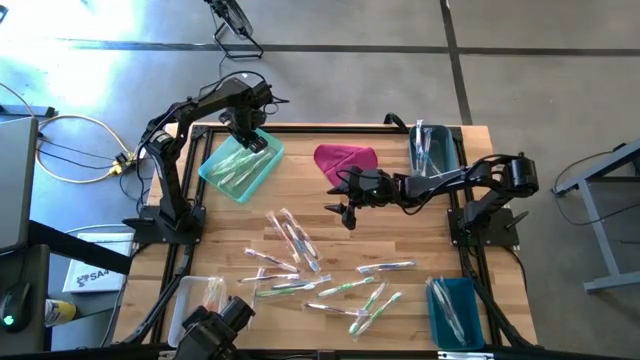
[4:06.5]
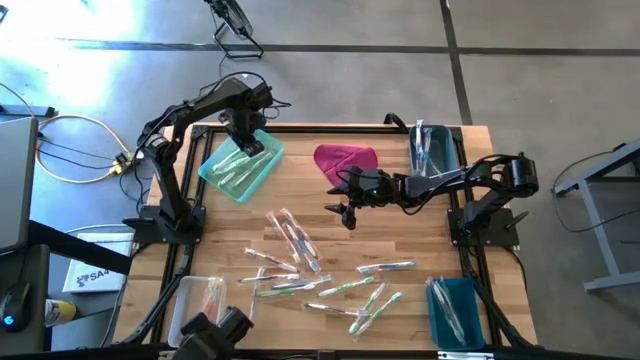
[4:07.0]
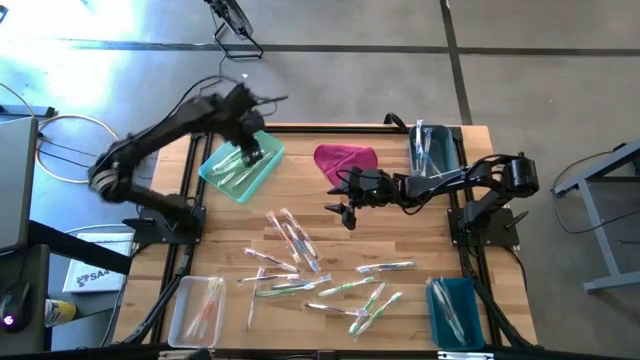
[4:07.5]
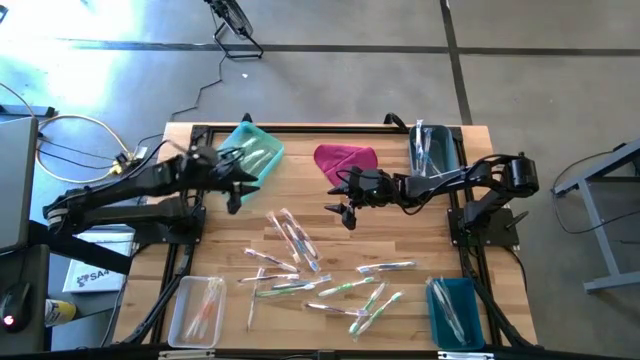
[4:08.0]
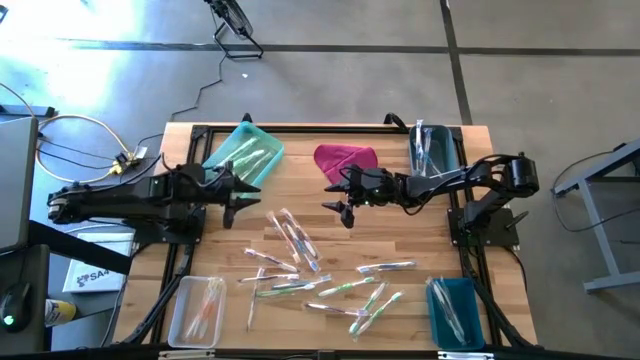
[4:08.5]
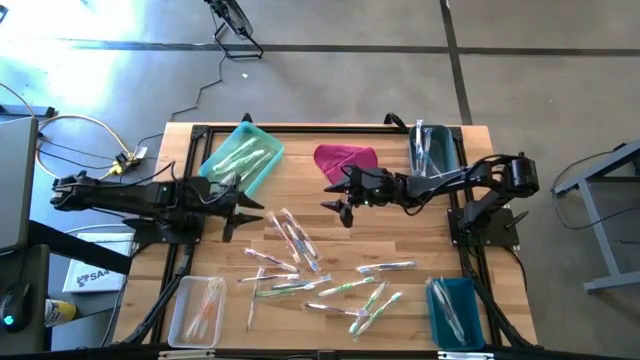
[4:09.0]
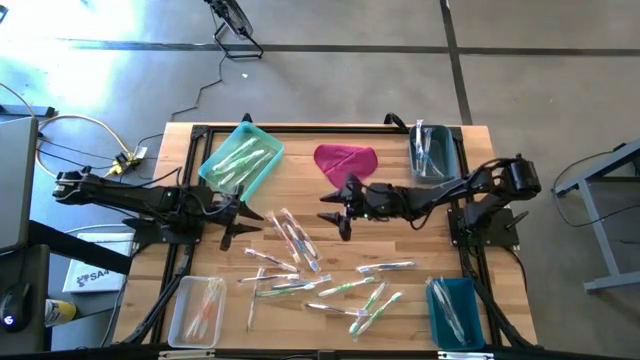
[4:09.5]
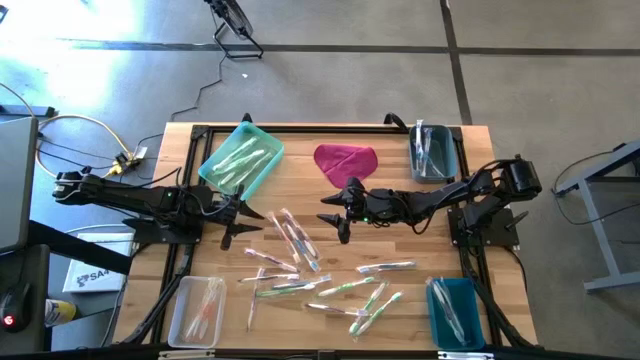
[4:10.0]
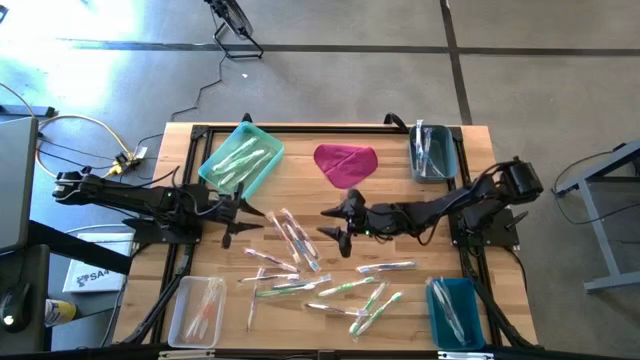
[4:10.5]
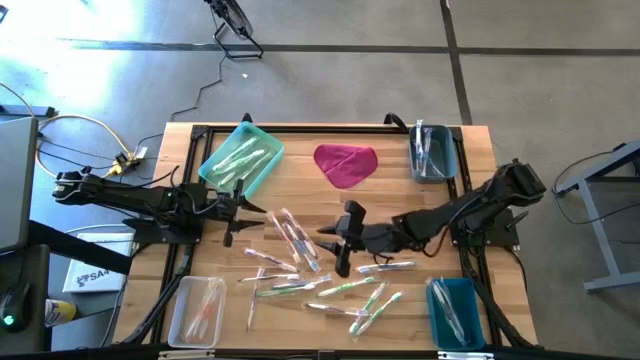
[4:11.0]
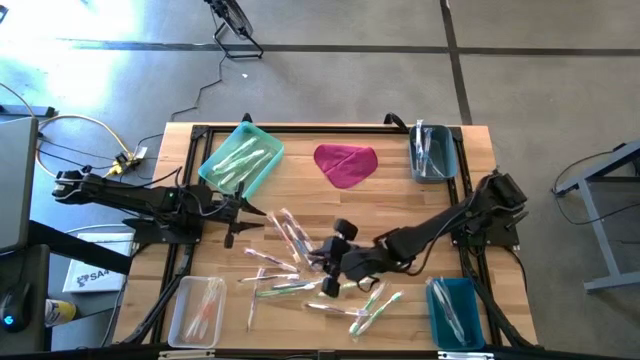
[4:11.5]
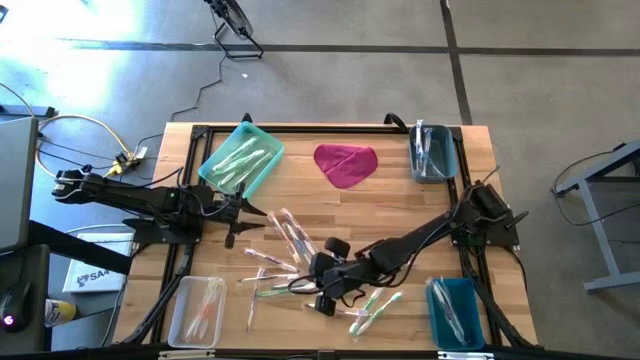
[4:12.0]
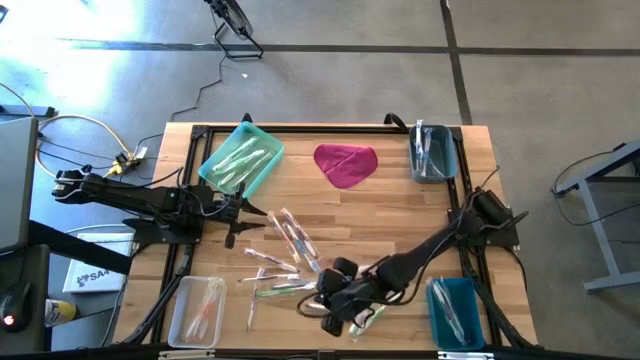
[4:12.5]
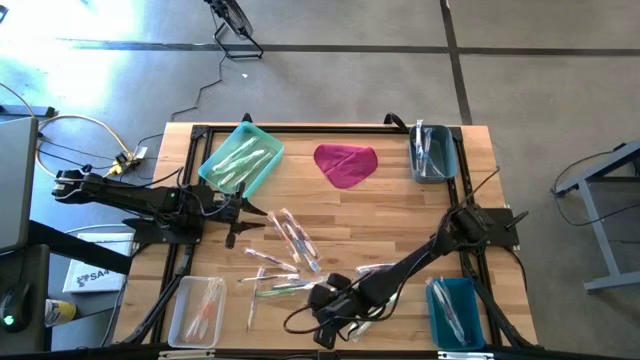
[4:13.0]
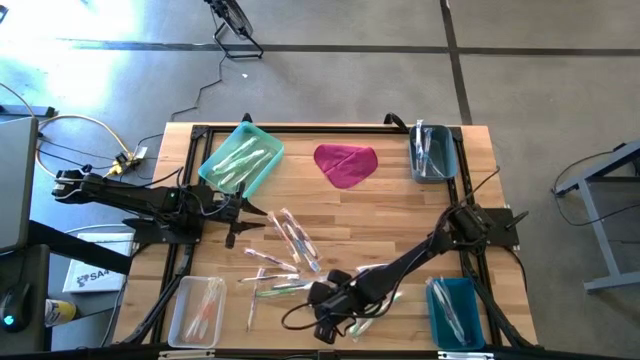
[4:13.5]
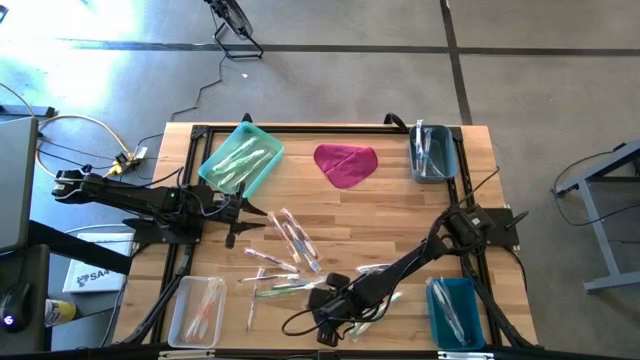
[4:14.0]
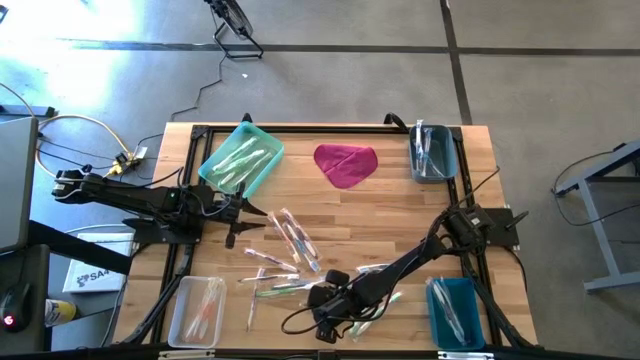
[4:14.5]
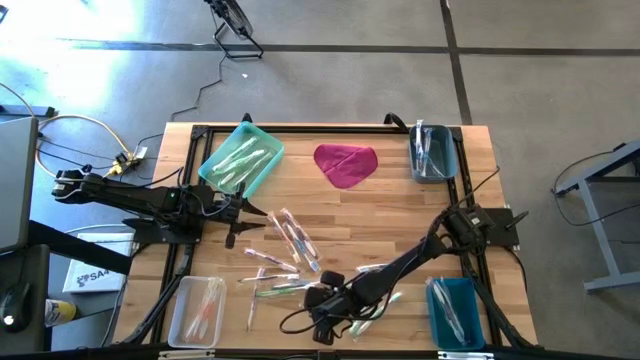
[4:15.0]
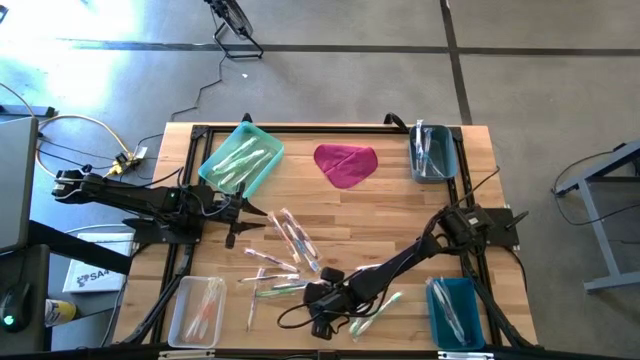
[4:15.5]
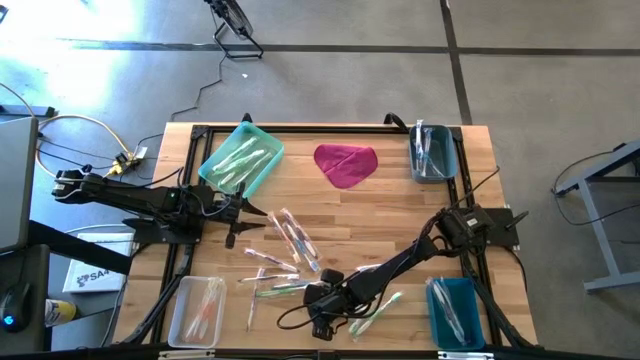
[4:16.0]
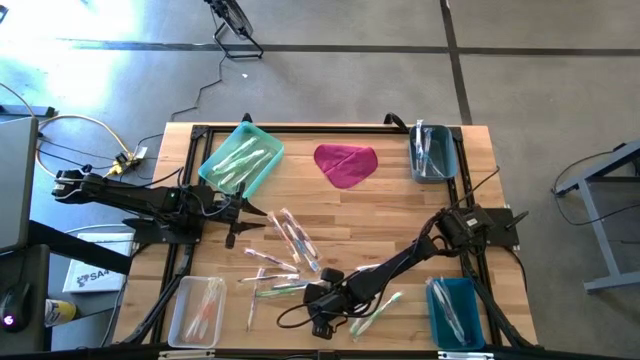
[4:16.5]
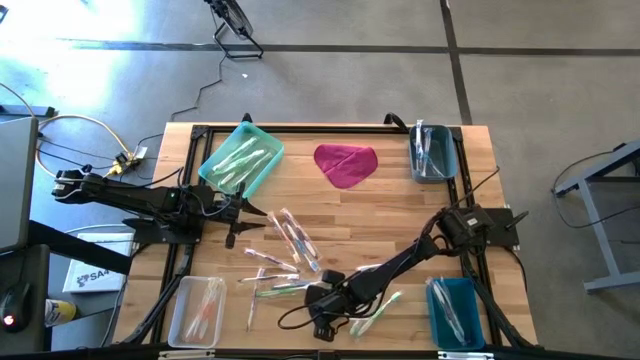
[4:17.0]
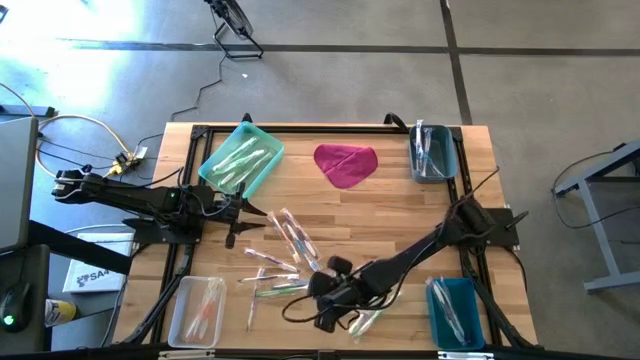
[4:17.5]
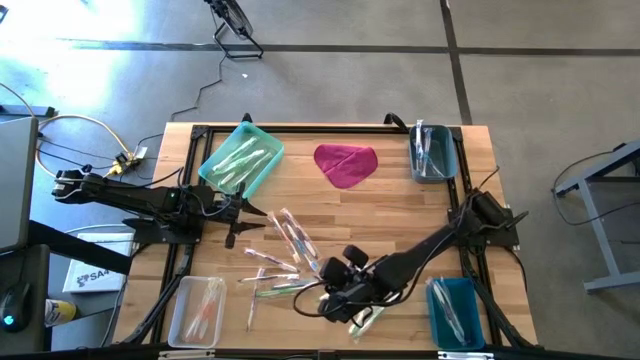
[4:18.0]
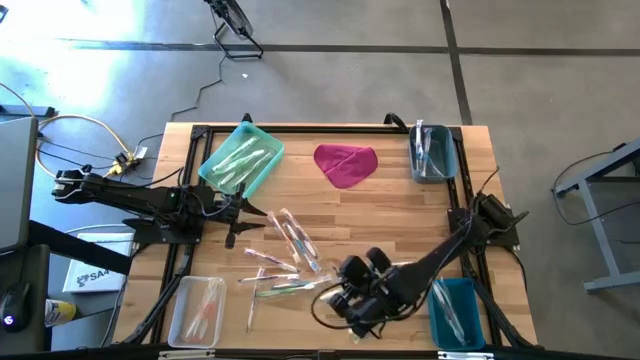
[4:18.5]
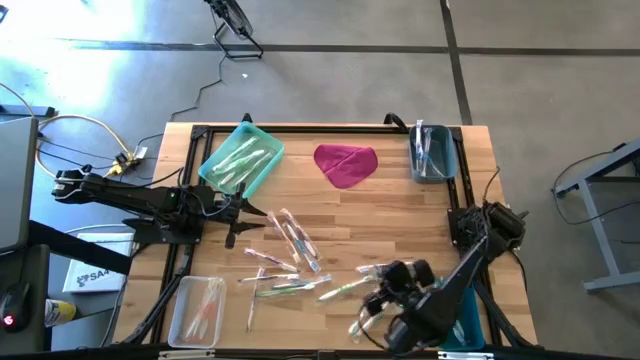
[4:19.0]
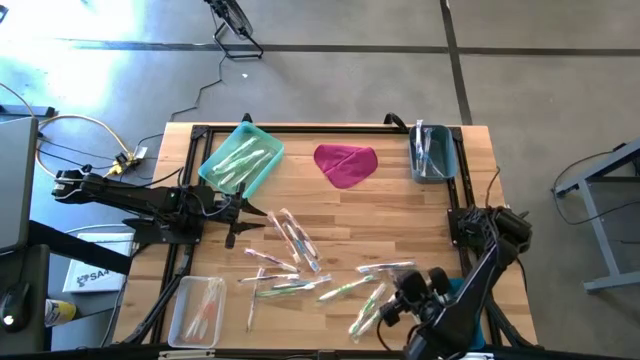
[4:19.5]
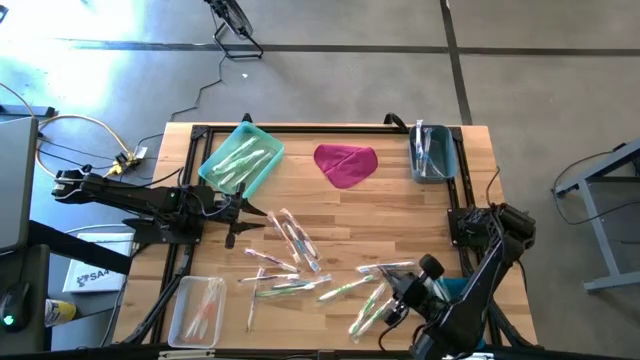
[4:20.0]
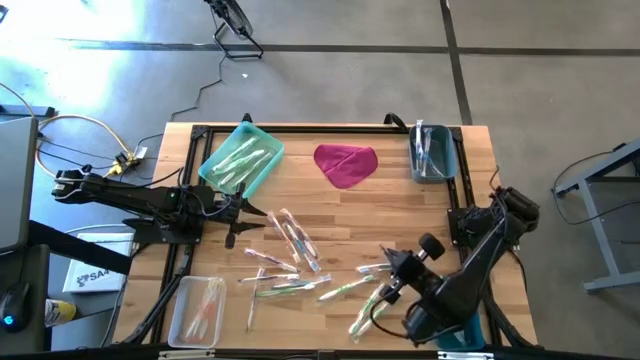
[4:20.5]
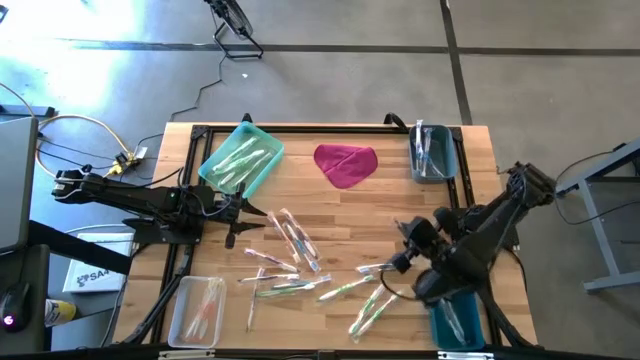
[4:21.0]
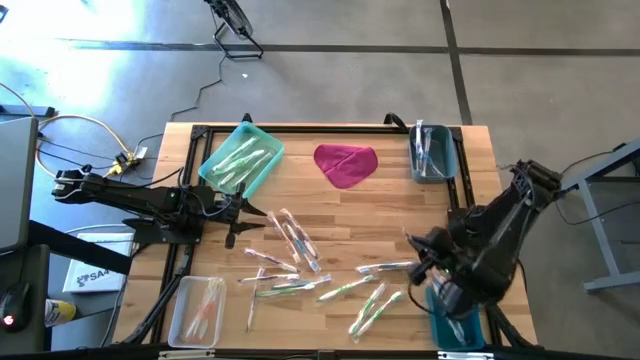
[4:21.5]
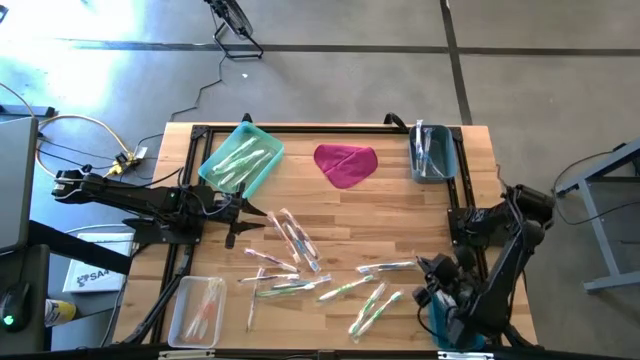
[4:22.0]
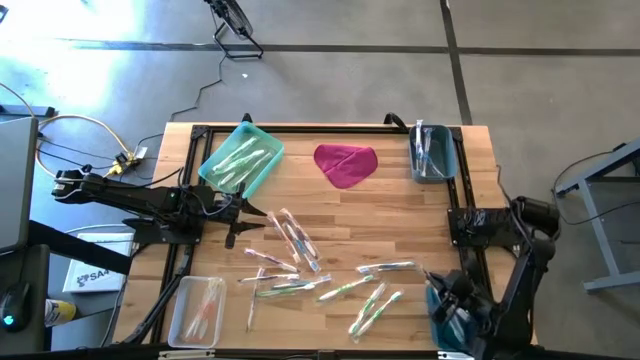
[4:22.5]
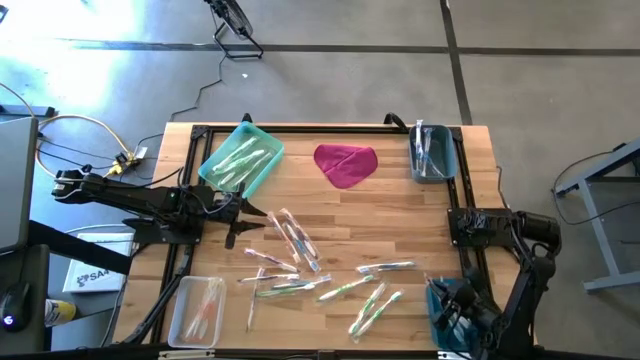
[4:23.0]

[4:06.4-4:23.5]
Task: Pick & Place Toothbrushes
Put the purple toothbrush to the dark blue bin bin

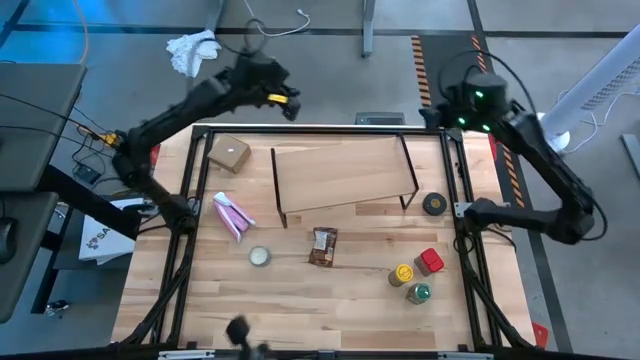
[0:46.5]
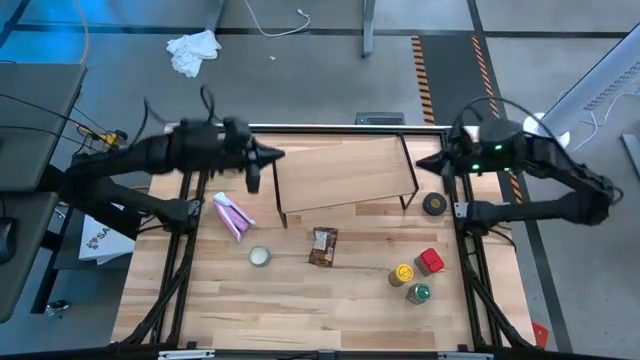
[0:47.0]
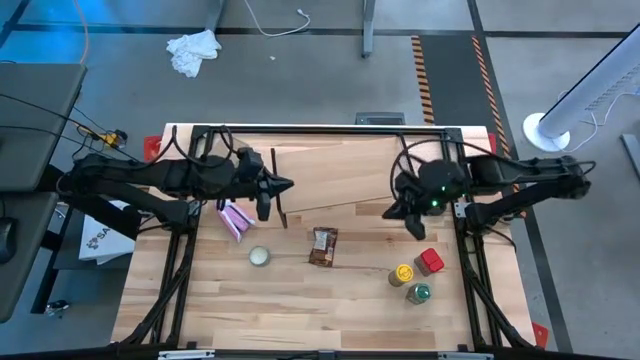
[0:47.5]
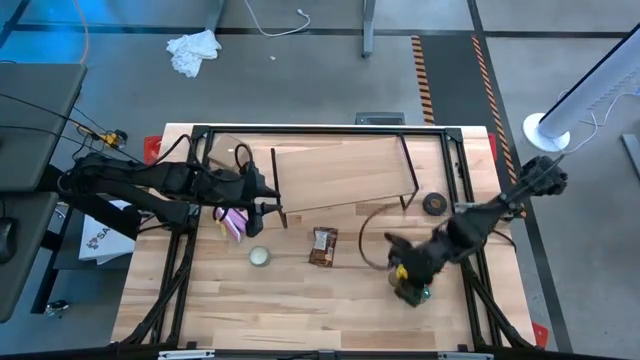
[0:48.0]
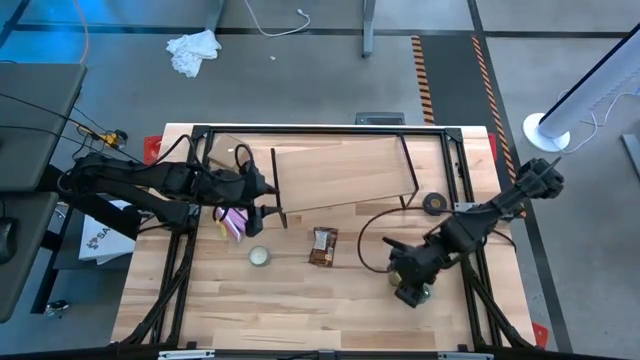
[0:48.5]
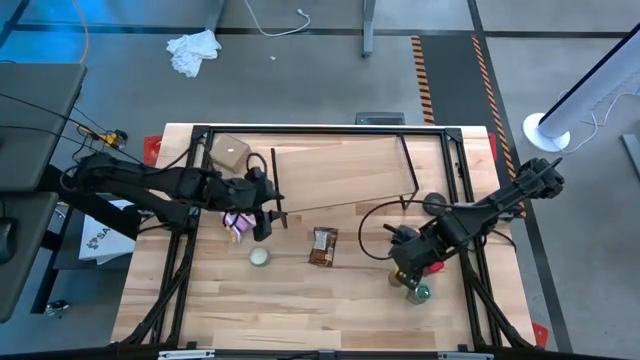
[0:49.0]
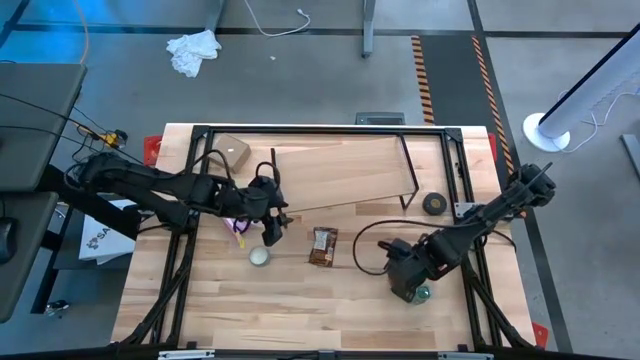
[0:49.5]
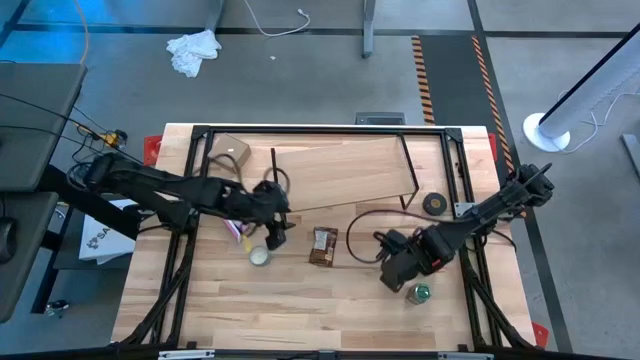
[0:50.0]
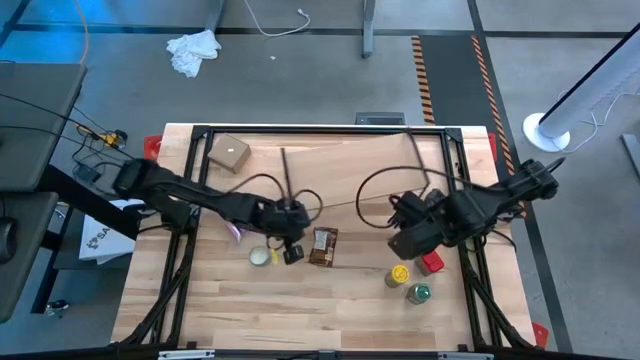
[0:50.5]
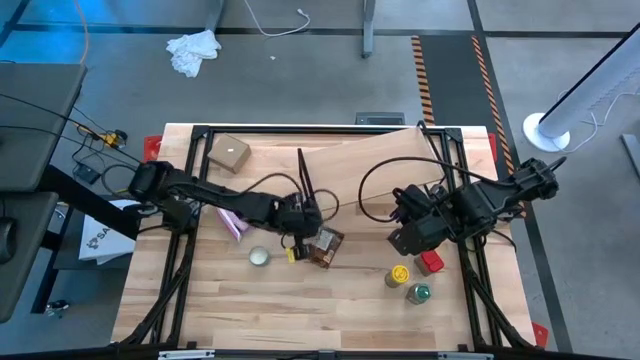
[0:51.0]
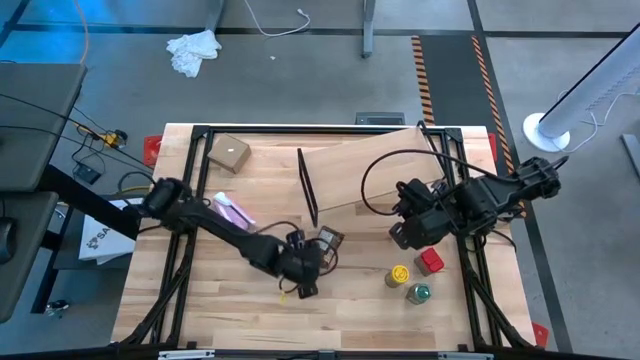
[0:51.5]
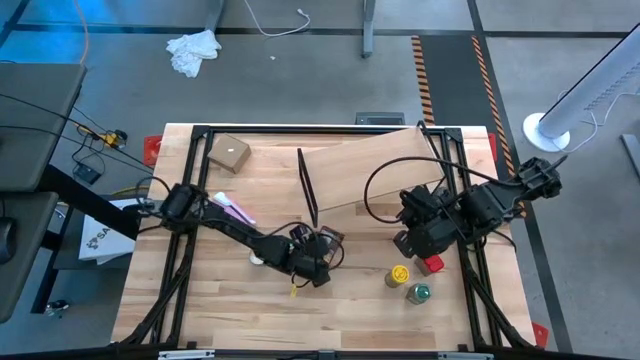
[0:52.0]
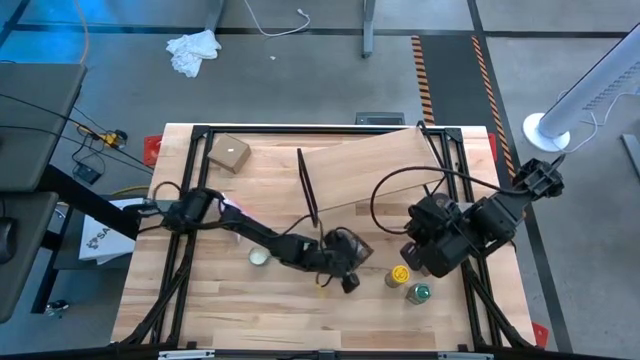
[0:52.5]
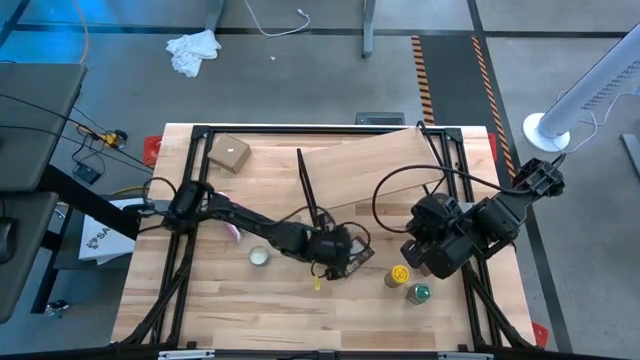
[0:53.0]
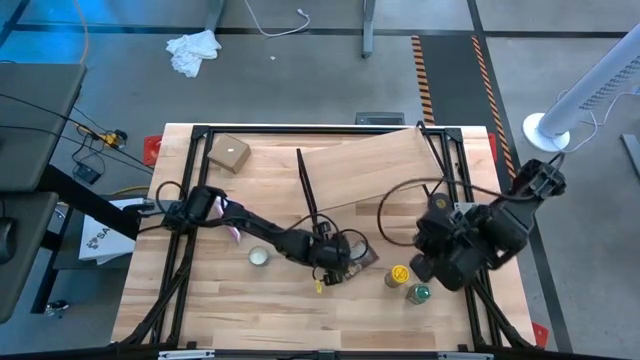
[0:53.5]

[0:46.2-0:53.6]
Task: Shelf spices
Adjust the orange spice pack
